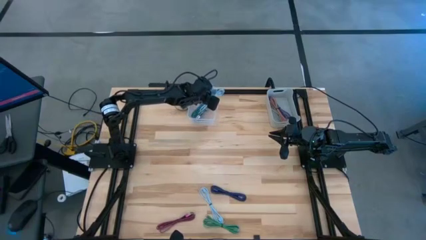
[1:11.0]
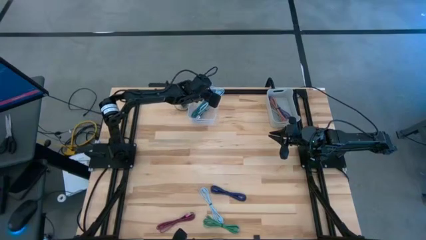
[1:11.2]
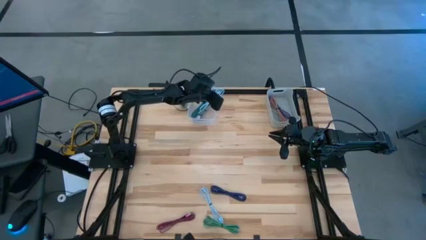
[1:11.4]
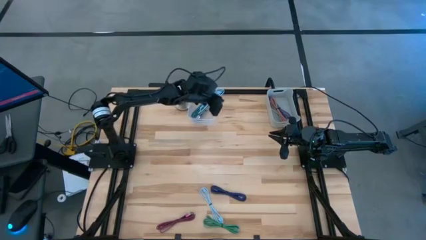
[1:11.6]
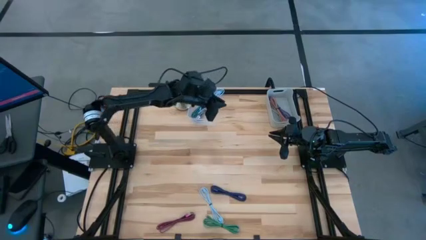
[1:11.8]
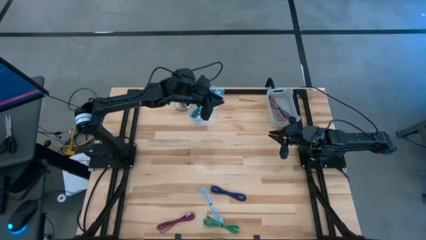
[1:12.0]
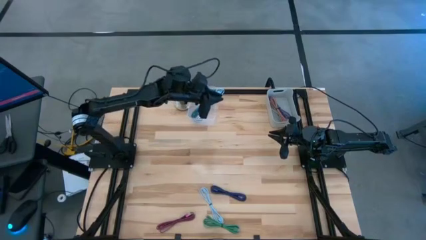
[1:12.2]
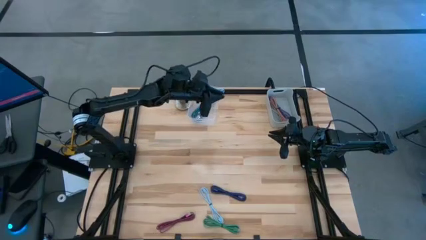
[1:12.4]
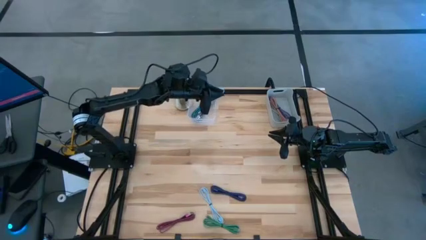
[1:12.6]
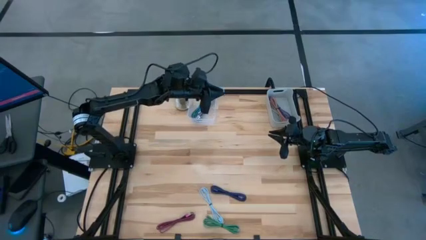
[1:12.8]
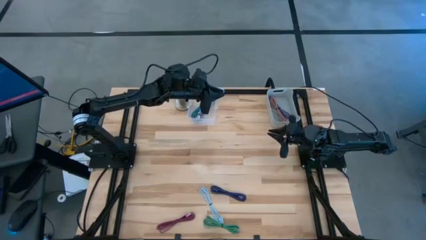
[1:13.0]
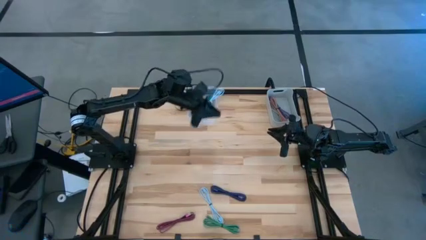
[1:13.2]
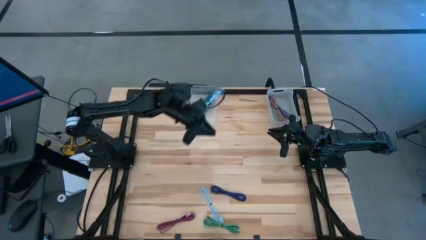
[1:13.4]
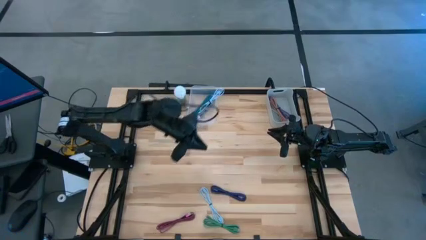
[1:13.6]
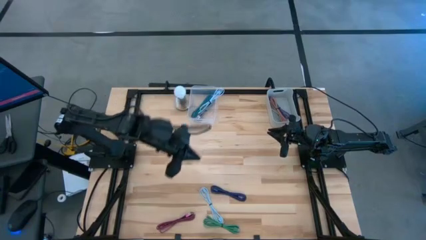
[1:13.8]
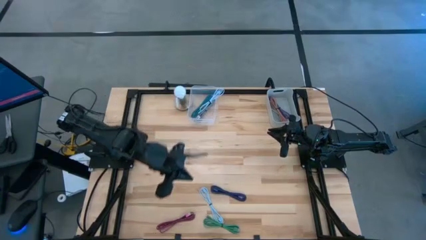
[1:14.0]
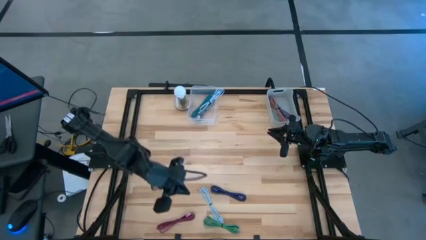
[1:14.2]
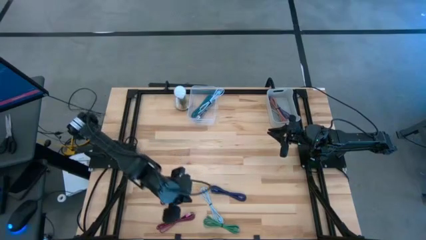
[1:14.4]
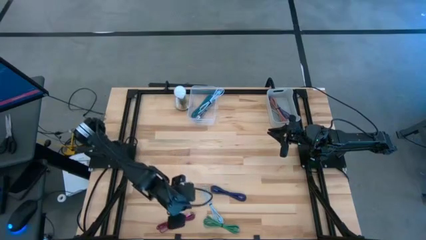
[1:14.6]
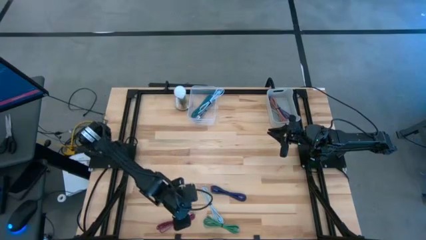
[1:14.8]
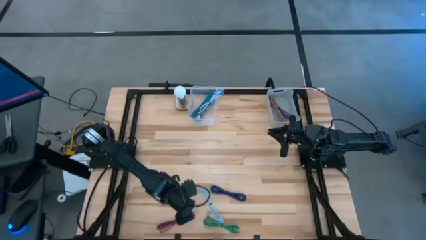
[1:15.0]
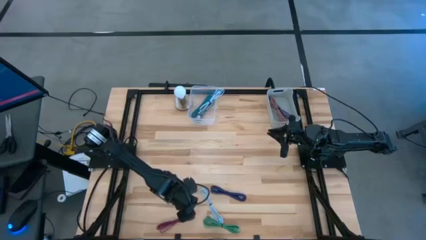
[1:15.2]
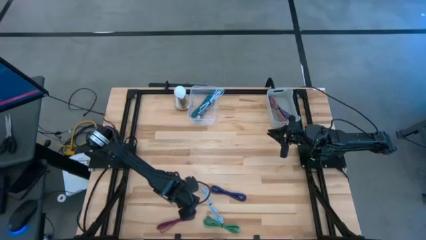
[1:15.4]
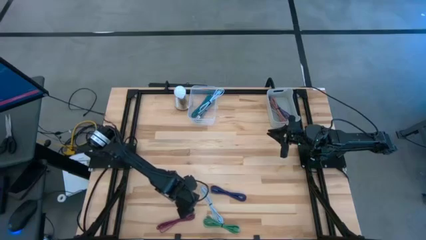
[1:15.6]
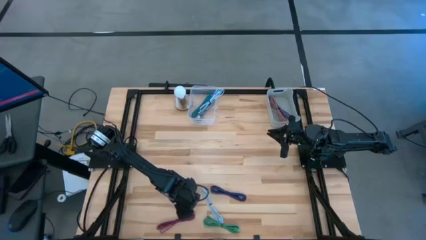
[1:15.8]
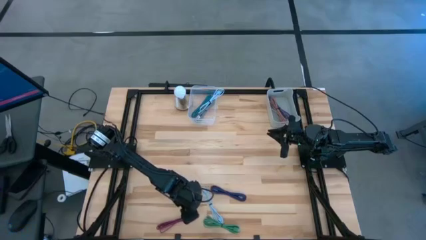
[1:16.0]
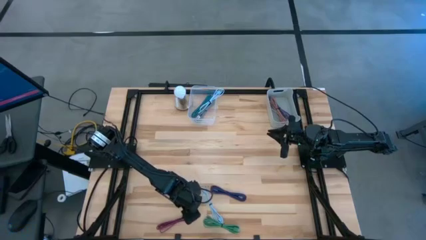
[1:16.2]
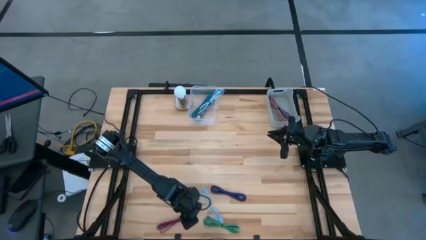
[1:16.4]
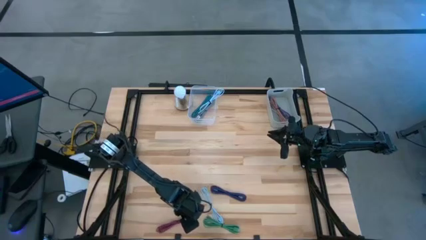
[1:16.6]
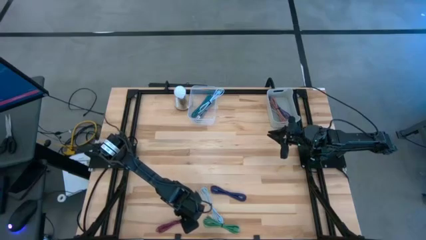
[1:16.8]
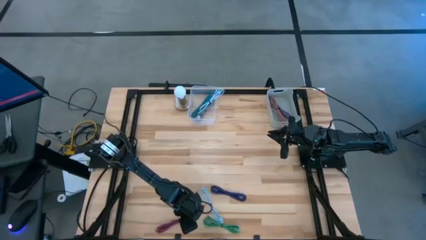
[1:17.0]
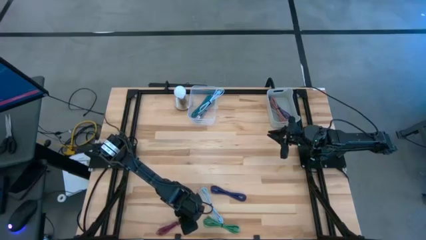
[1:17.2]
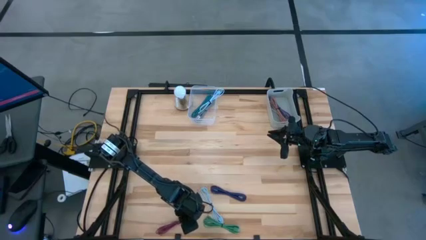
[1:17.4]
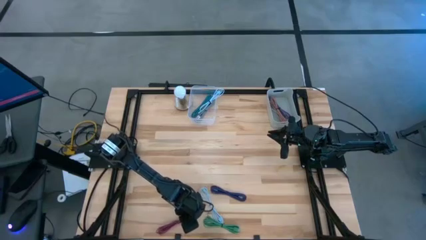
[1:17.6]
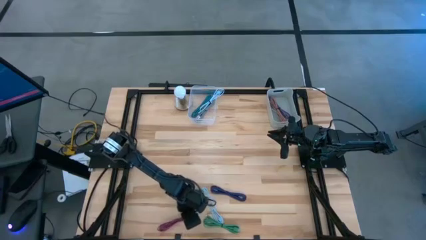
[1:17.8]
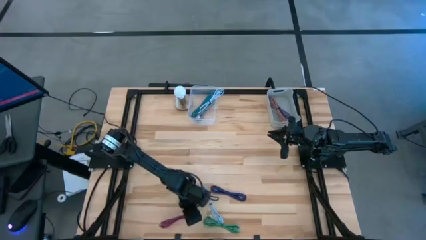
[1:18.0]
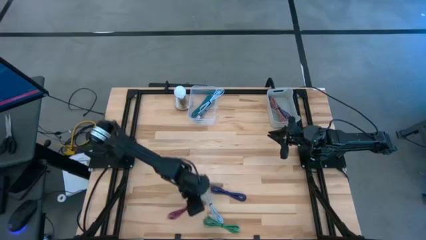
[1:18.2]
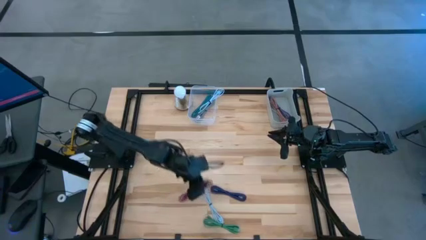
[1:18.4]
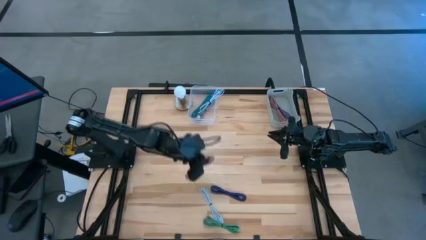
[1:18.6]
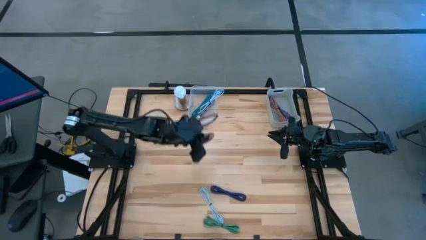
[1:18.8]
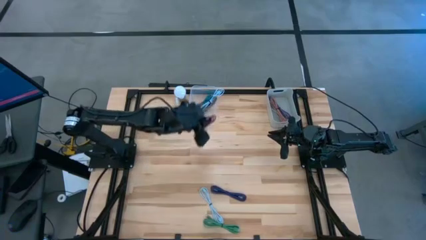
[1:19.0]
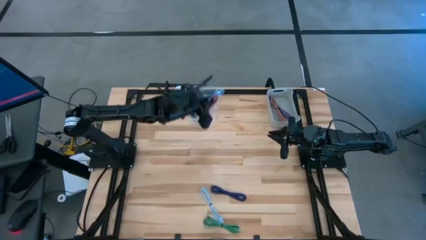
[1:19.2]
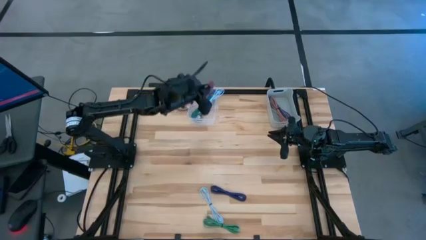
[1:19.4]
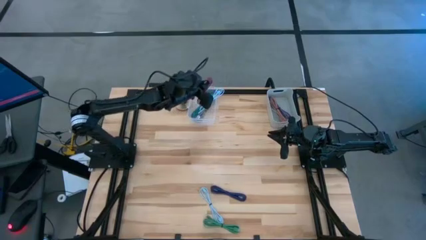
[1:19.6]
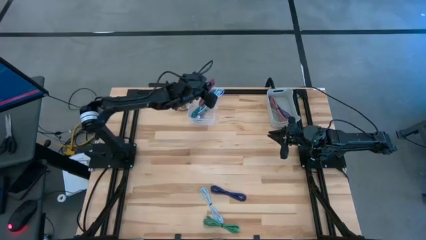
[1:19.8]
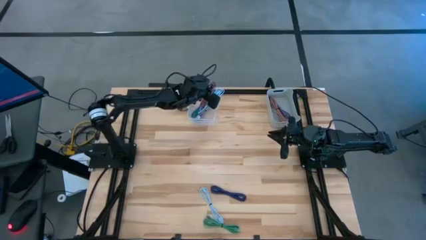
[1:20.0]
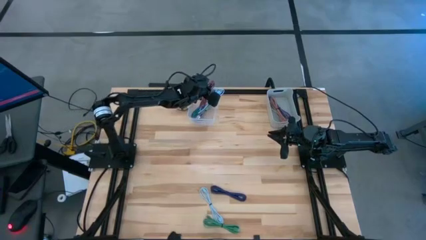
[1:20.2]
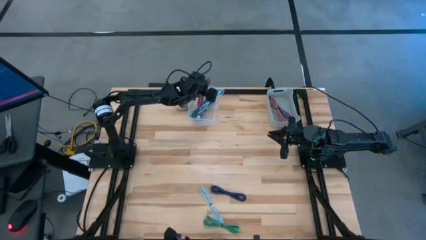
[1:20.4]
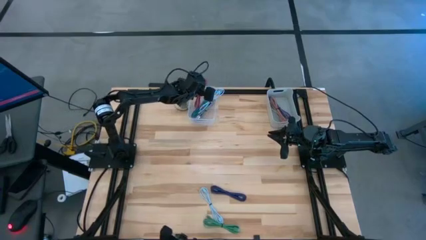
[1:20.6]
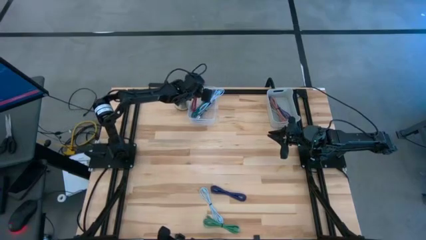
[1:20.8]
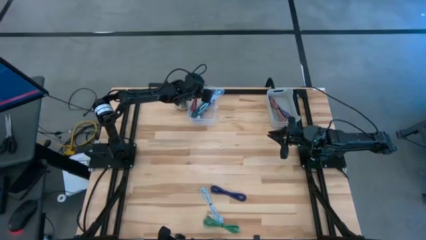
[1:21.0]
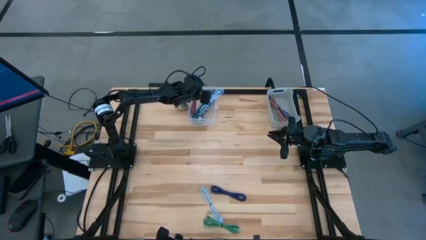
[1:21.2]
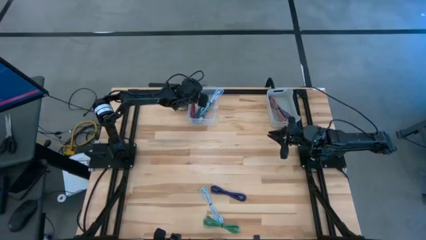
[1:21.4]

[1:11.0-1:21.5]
Task: Pick & Place USB Port
Put the black red charger cable into the transparent bin

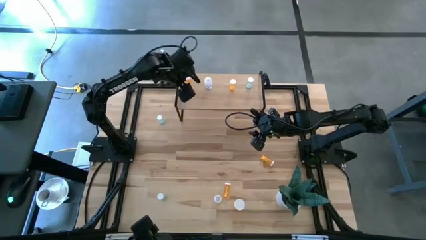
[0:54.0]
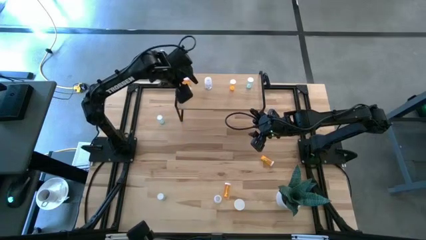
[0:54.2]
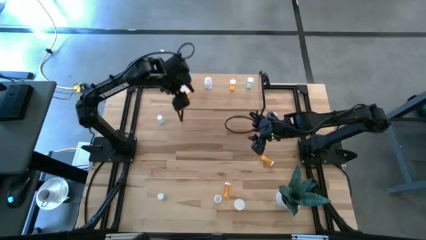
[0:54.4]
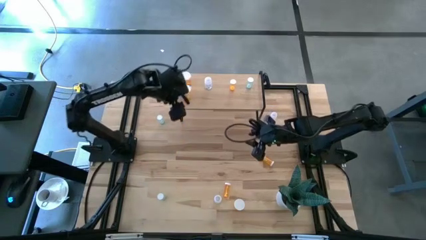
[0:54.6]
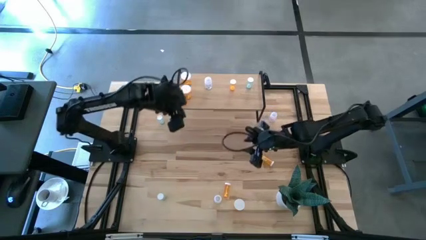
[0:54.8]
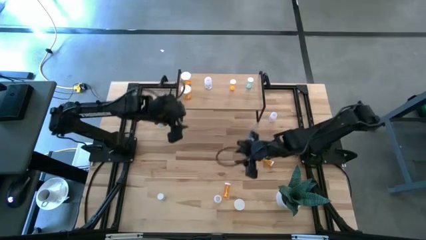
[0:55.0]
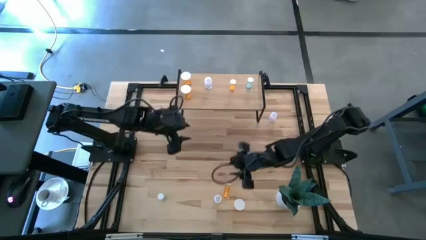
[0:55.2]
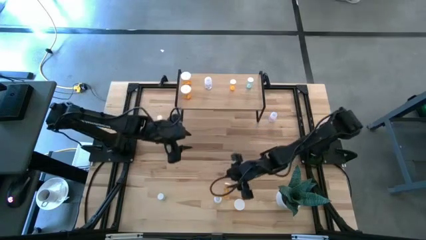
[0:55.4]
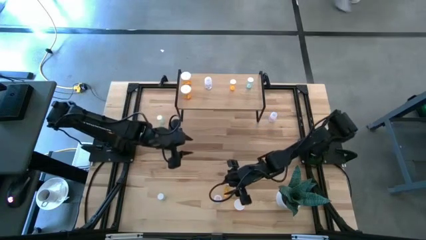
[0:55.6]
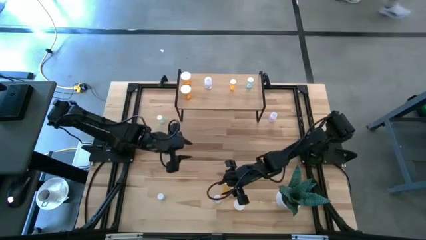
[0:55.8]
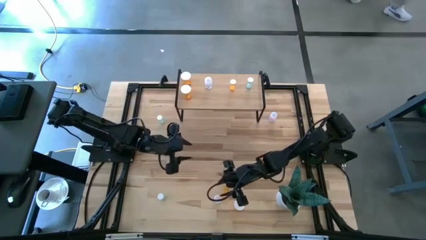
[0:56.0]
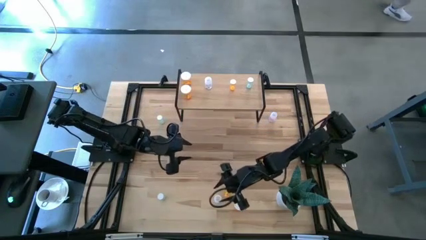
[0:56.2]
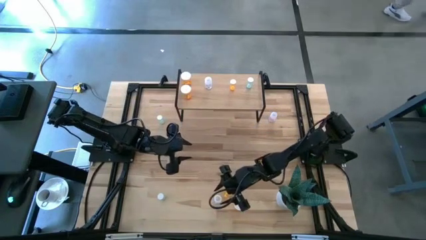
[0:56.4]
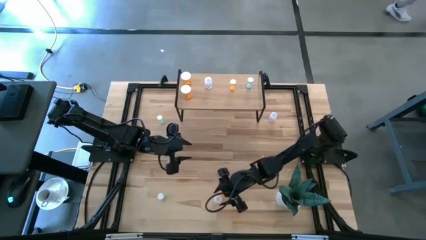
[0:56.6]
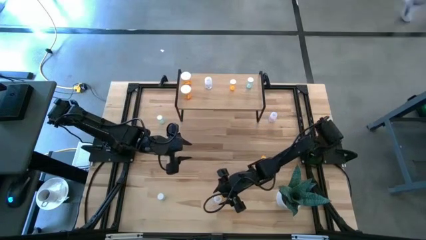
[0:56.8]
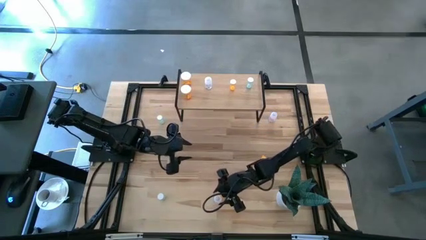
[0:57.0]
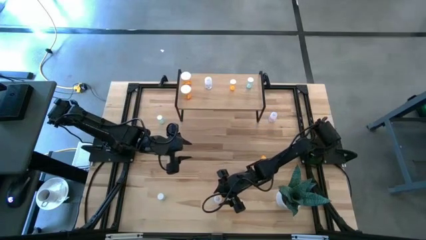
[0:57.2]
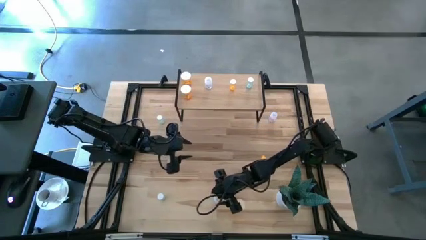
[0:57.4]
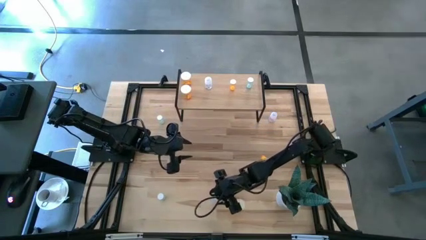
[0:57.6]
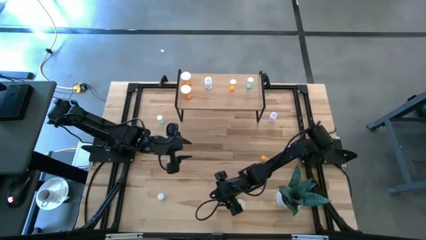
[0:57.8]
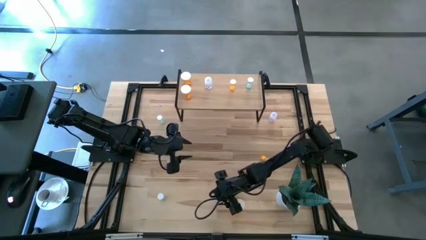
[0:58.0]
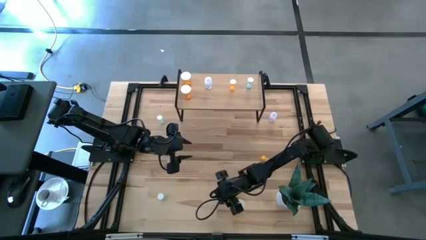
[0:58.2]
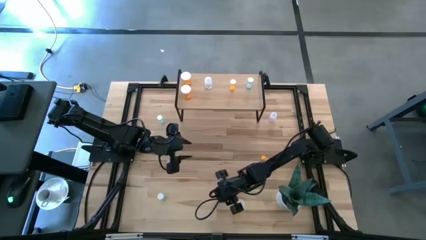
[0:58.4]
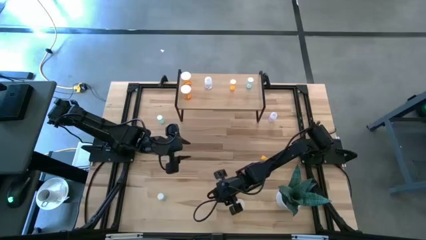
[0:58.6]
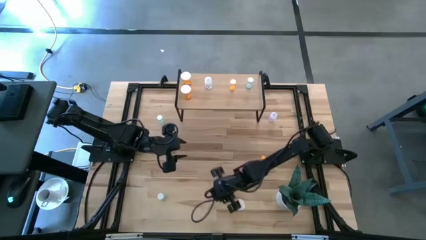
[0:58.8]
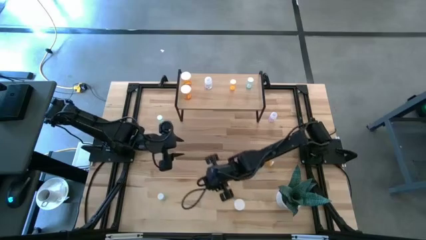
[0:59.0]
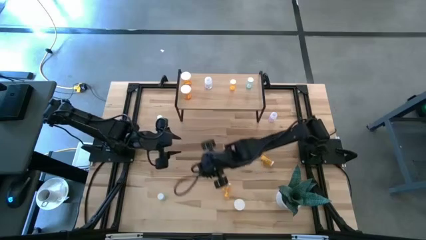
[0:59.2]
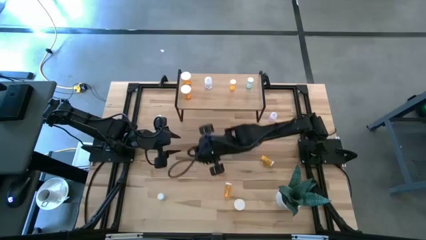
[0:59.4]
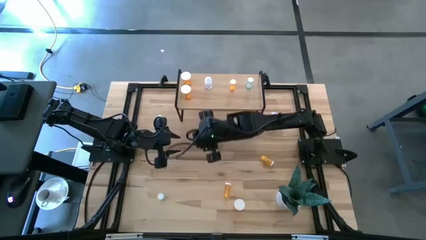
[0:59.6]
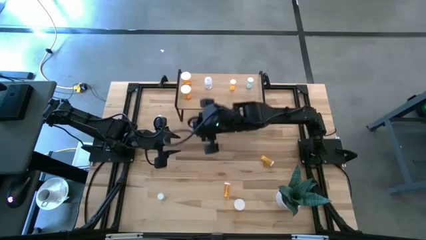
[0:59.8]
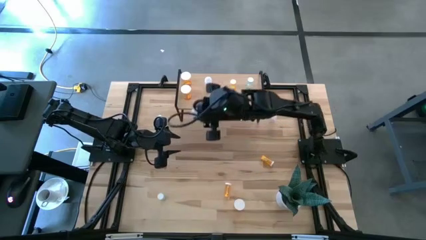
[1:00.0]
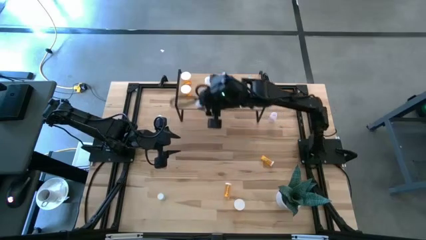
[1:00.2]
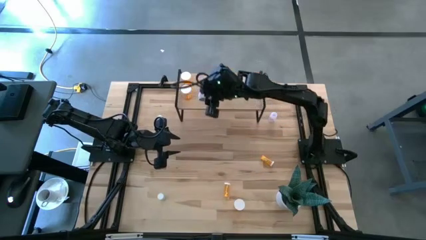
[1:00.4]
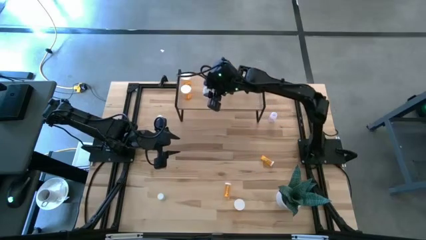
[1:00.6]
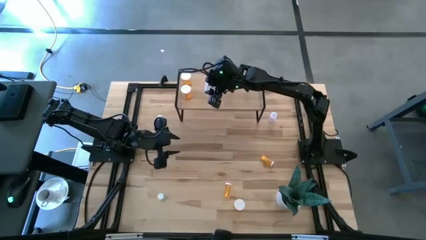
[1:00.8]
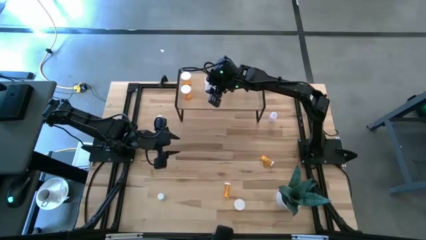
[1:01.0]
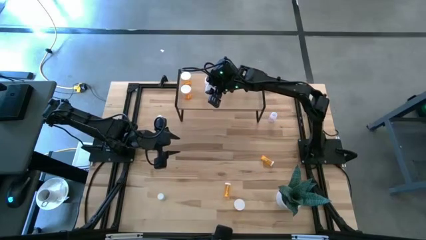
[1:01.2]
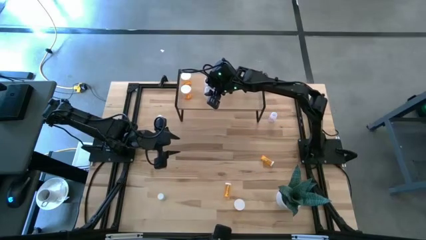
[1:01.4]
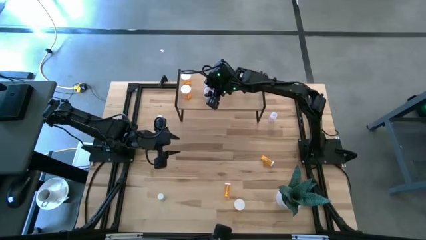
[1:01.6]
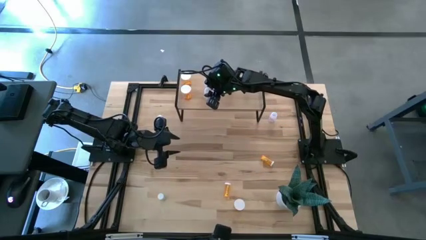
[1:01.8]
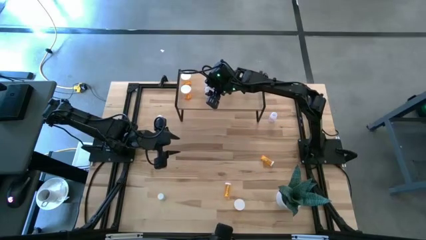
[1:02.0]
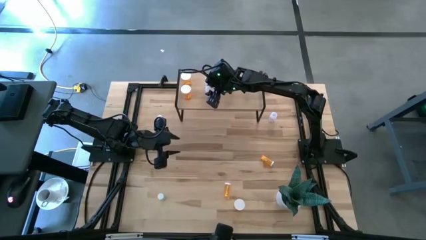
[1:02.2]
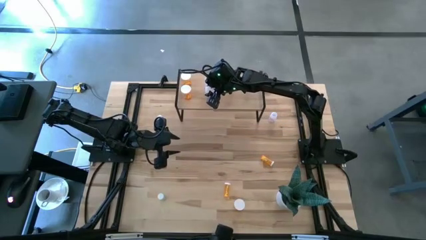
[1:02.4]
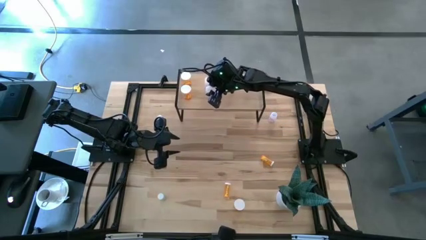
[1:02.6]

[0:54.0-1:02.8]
Task: Pick and place medicine bottles onto shelf by color
Put the bottom transparent pill bottle on the shelf aligned with the other transparent pill bottle
